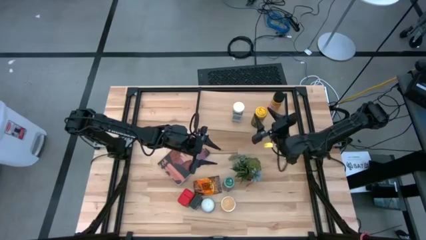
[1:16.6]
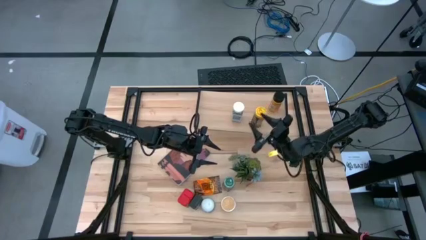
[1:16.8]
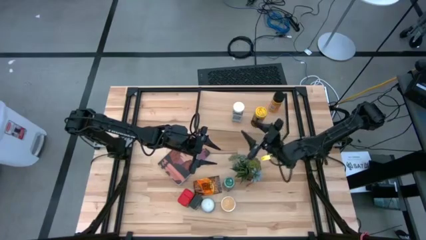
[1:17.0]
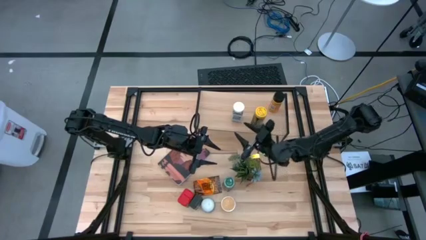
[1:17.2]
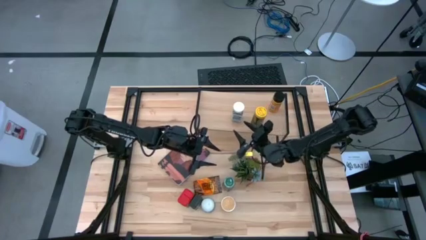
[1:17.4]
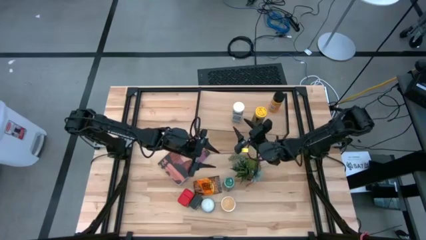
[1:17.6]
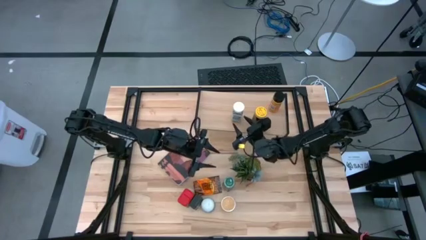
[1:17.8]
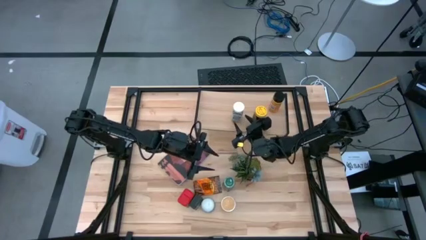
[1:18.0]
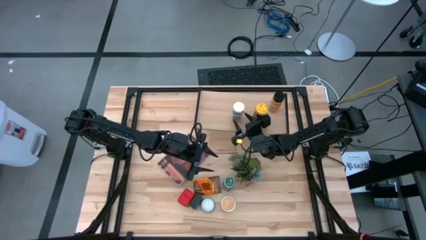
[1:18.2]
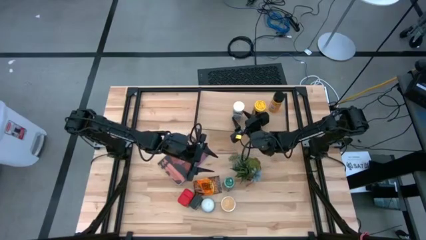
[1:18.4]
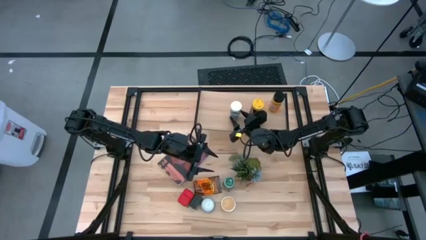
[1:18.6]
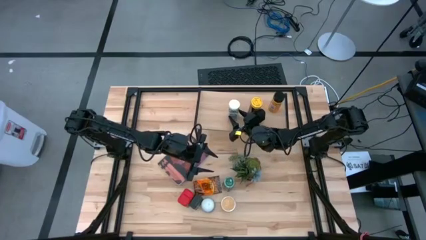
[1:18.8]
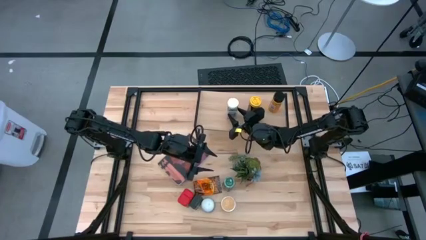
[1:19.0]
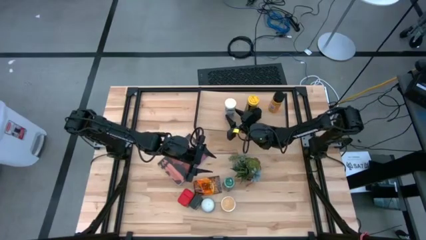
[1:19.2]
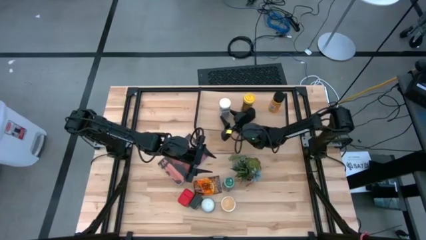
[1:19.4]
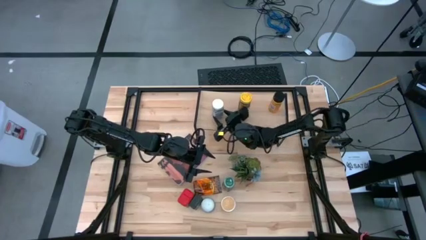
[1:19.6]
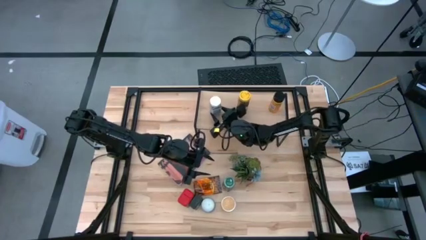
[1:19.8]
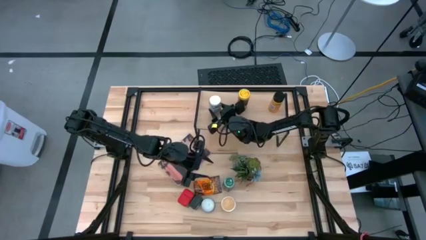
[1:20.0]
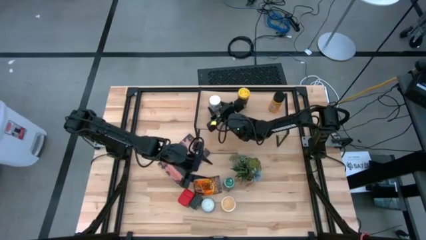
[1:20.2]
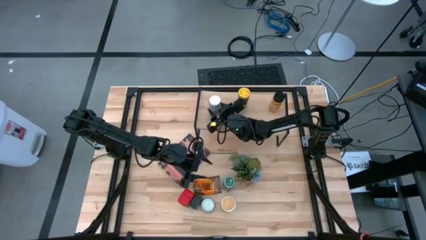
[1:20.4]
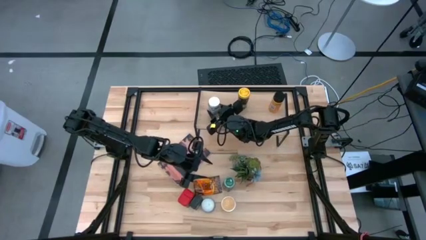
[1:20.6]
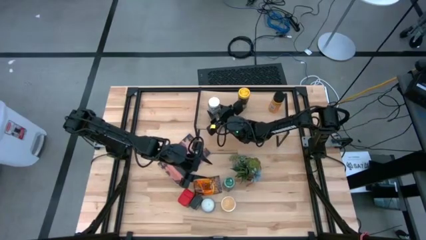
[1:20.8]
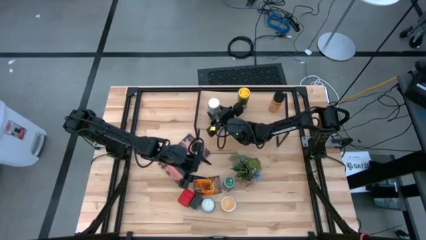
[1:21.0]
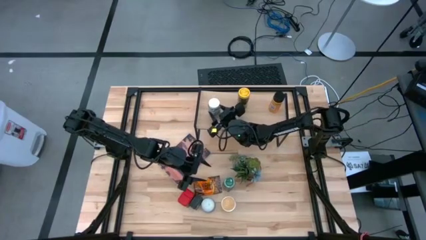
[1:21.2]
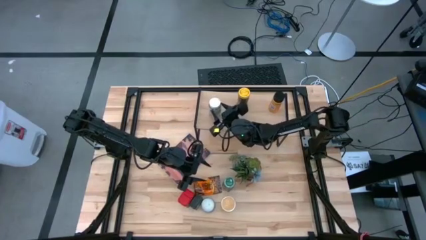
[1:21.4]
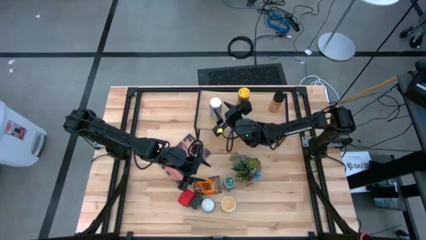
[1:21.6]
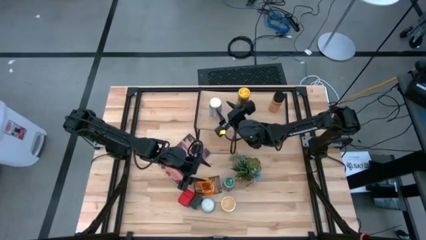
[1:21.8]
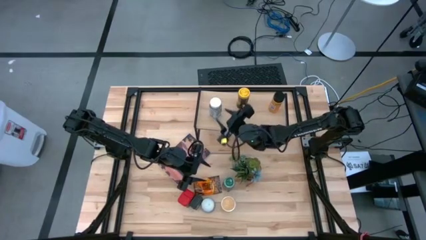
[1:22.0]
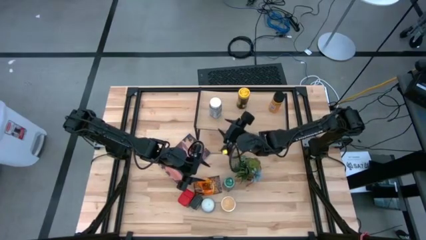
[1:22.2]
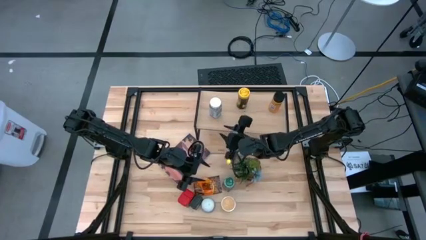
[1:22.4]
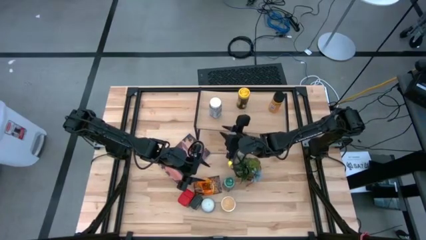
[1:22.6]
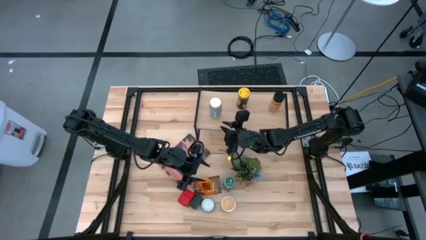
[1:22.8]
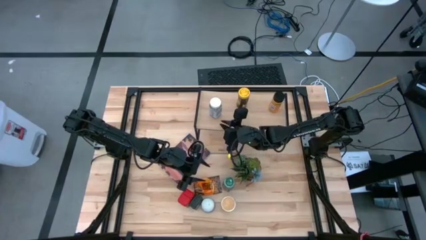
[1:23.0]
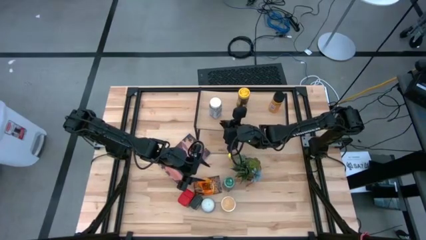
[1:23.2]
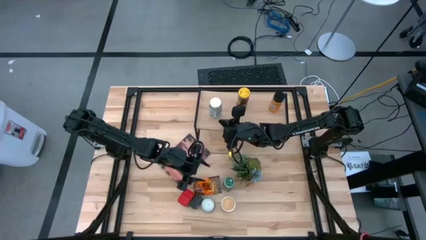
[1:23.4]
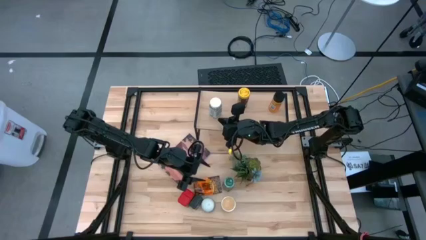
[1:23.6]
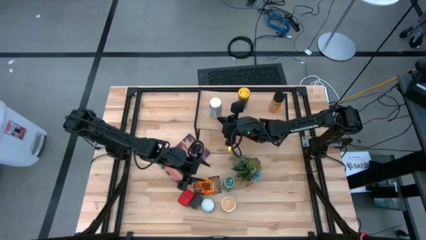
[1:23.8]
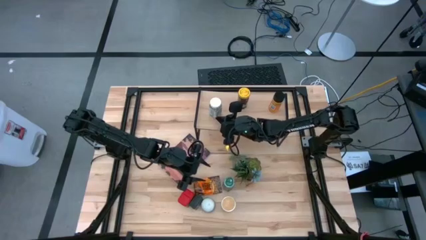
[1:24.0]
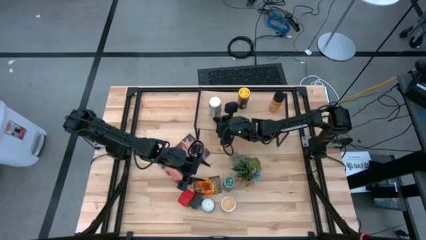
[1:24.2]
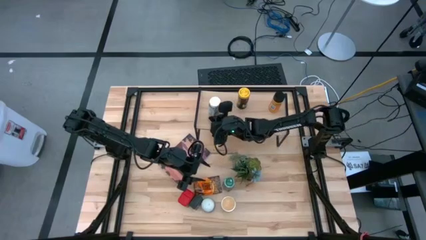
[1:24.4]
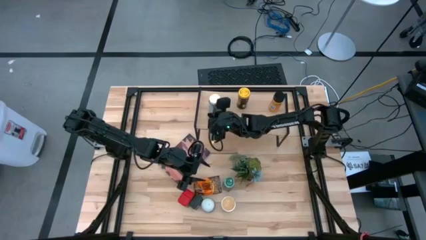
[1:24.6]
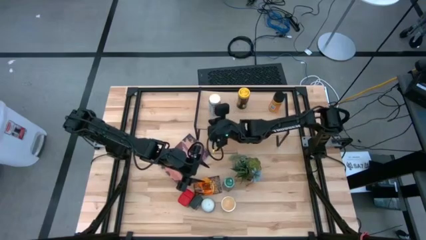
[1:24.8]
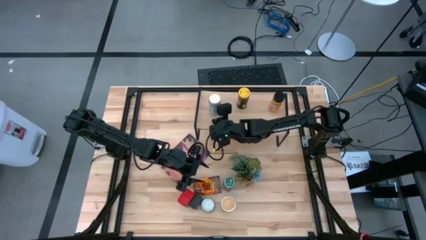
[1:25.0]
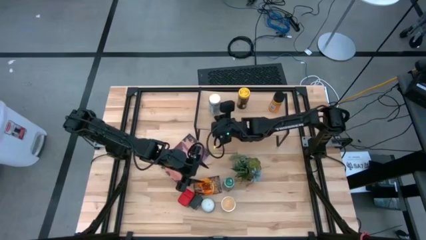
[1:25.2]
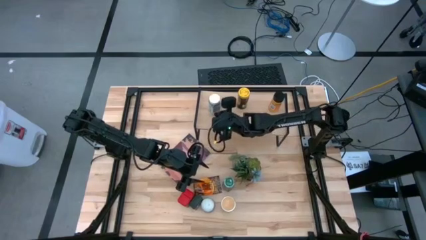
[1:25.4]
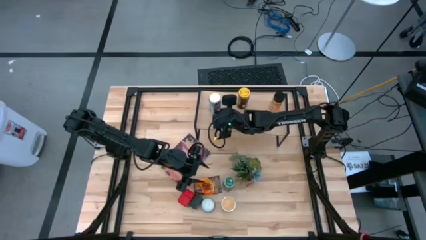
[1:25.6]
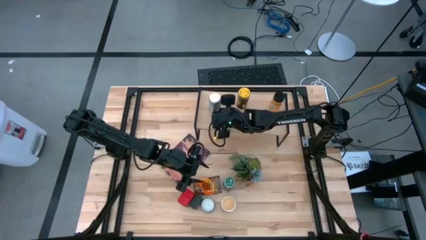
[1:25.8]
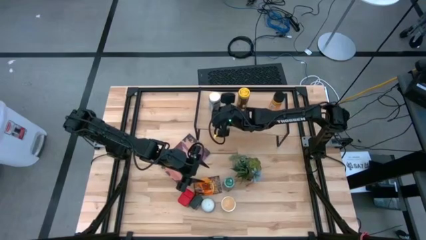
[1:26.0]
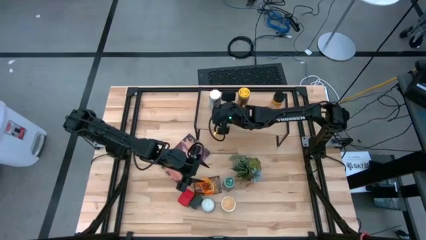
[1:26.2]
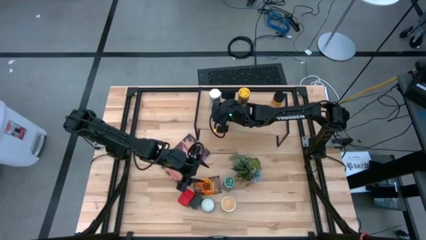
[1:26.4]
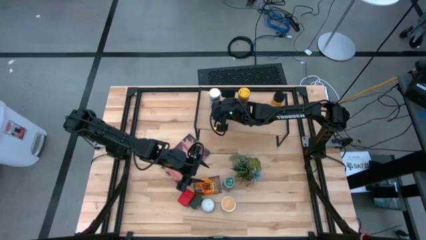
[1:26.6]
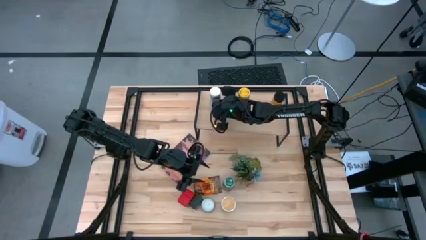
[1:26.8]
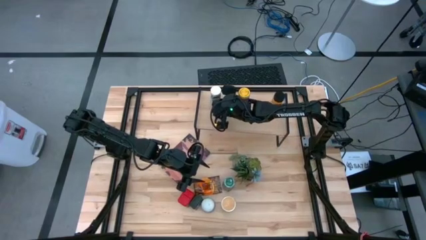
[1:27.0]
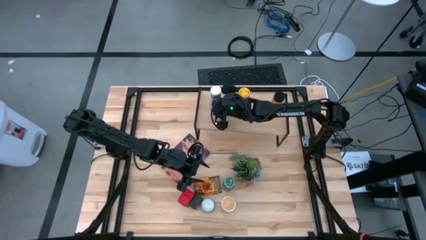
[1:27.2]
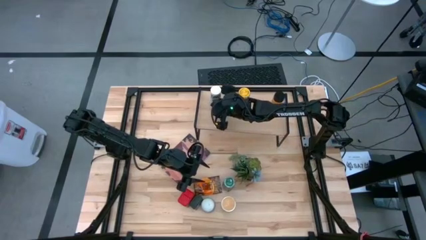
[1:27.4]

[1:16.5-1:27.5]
Task: Shelf spices
Adjust the white seasoning bottle

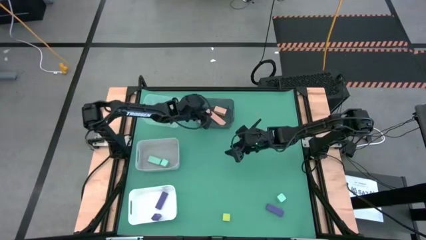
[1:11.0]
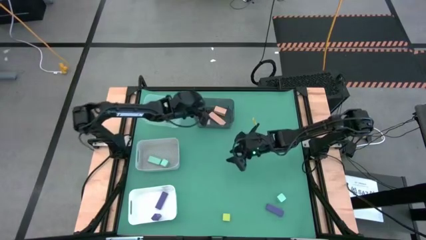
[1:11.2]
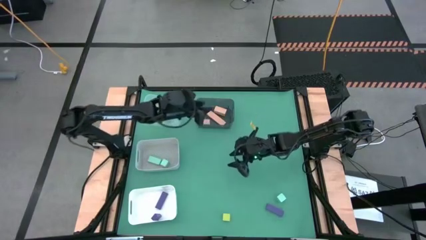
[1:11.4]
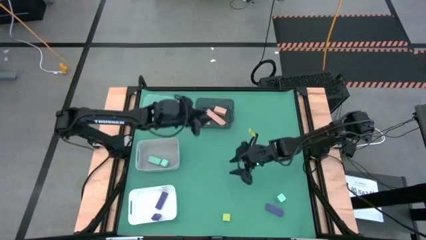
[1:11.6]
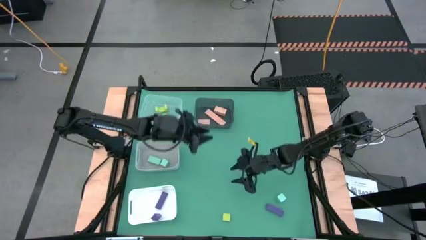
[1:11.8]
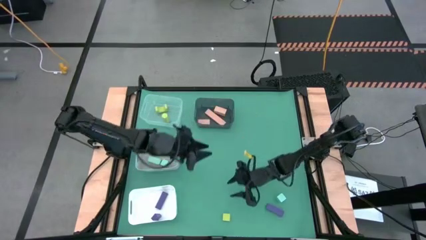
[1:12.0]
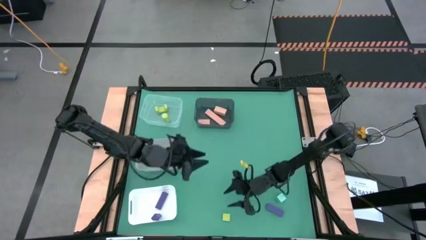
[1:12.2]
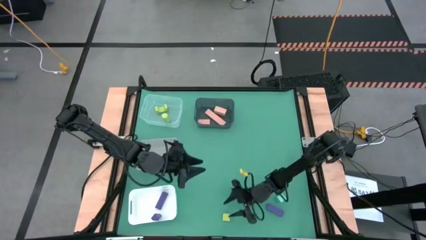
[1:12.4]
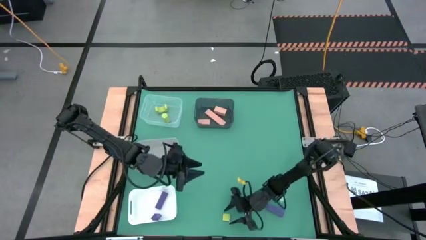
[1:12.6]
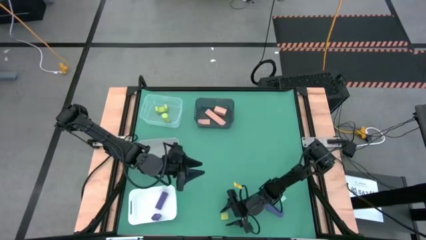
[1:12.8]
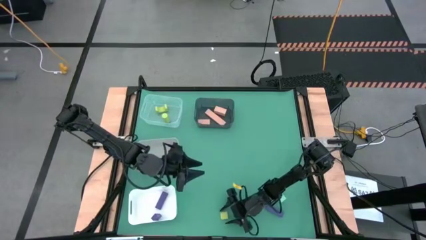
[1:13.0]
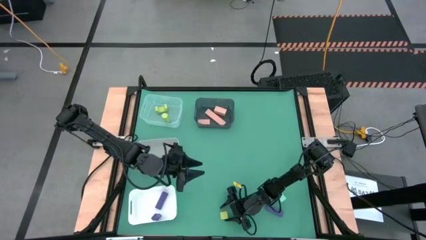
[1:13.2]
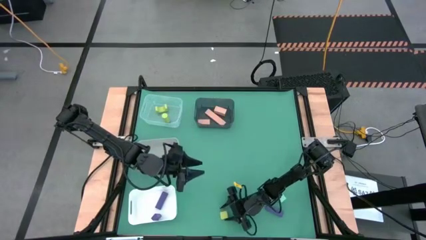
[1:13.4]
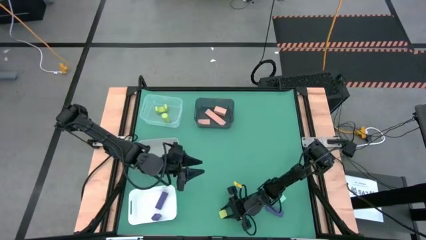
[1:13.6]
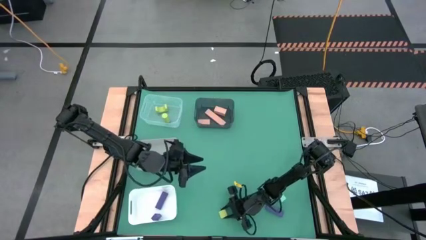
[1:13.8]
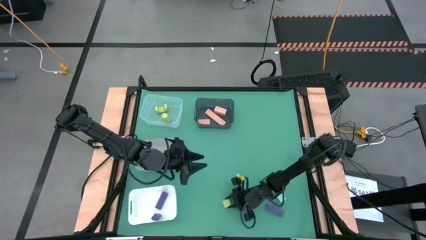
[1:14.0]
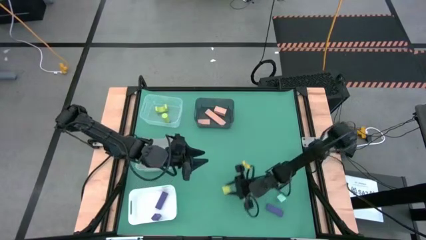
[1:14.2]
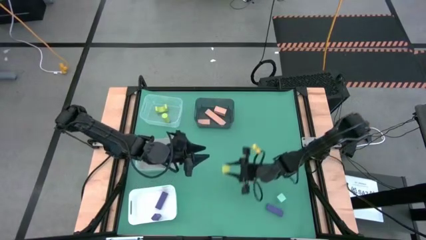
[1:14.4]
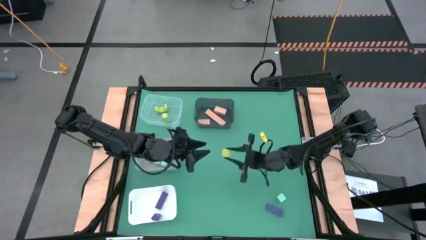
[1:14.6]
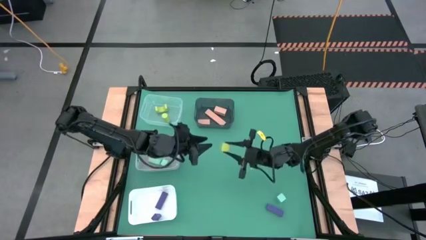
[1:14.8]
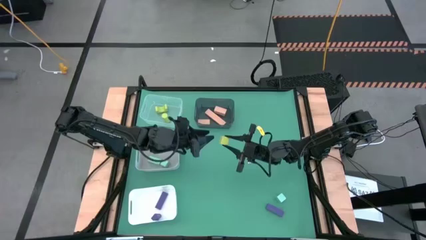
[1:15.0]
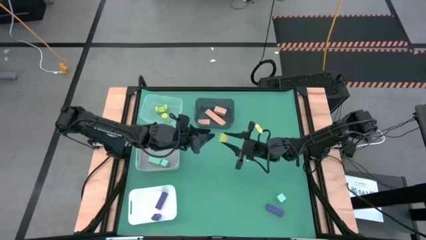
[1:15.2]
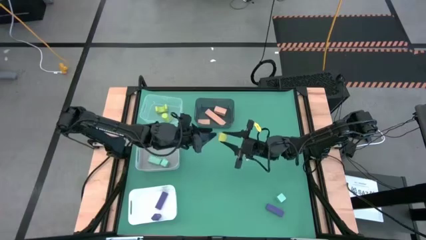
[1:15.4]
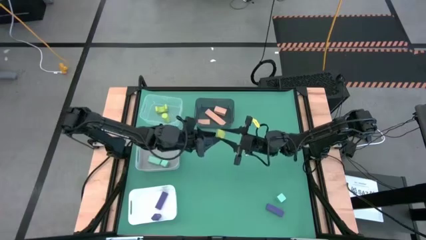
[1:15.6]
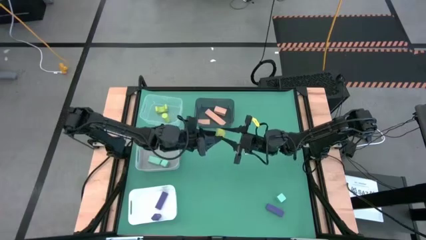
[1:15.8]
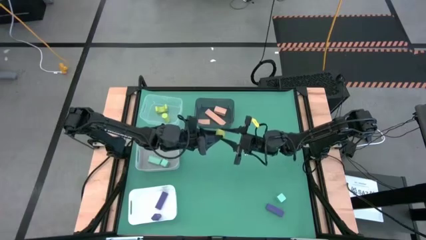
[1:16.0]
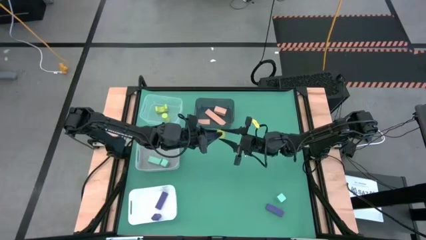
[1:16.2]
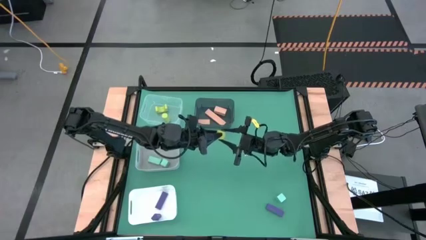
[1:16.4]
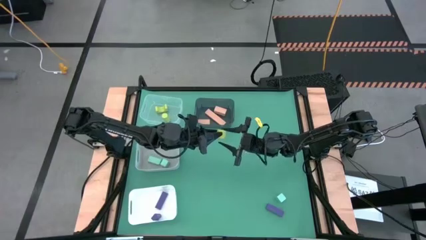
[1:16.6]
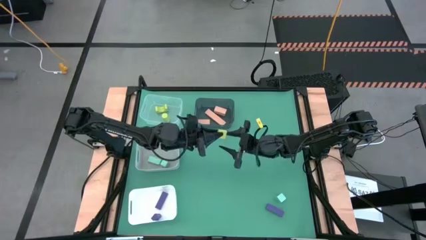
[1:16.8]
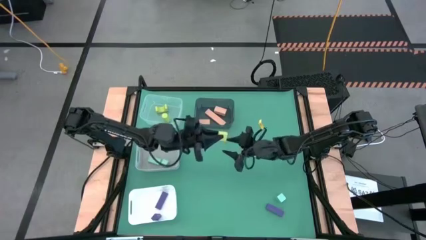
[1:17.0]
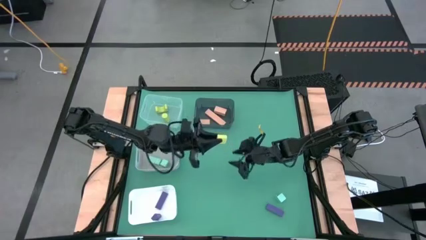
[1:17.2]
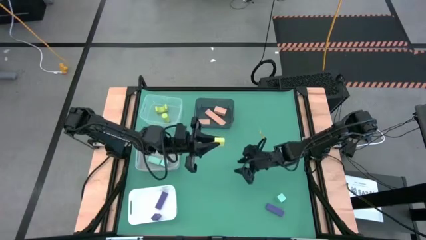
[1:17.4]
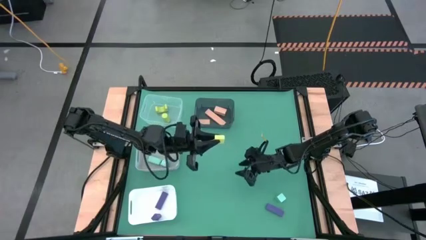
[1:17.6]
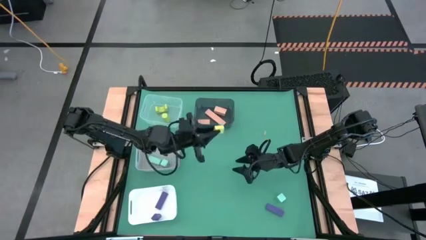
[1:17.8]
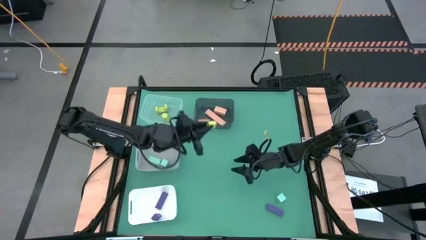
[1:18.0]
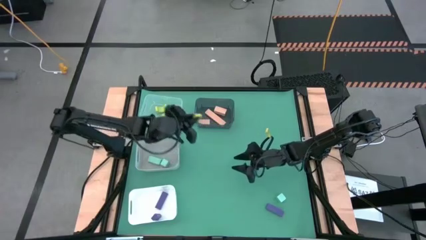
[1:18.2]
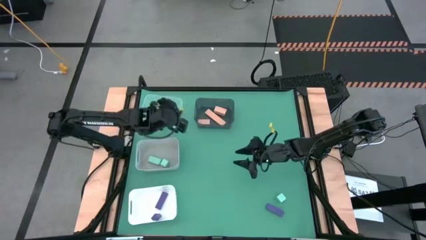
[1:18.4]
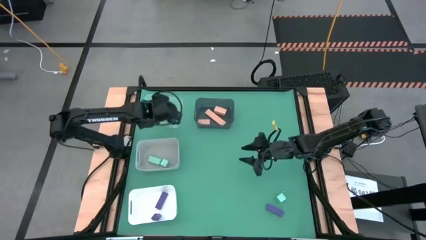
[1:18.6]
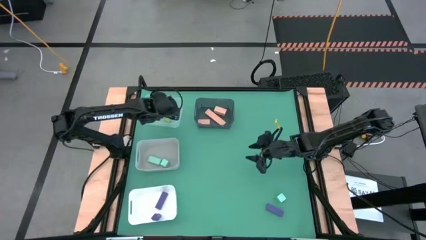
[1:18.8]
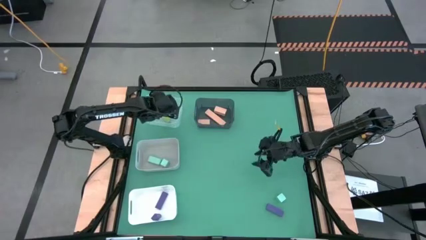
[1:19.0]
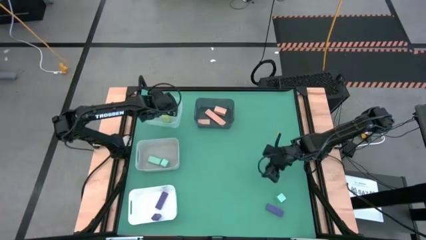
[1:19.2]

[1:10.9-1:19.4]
Task: Sort & place blocks by color
Put the green block into the transparent bin
